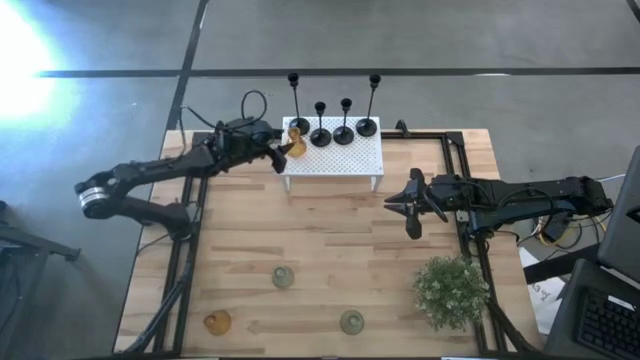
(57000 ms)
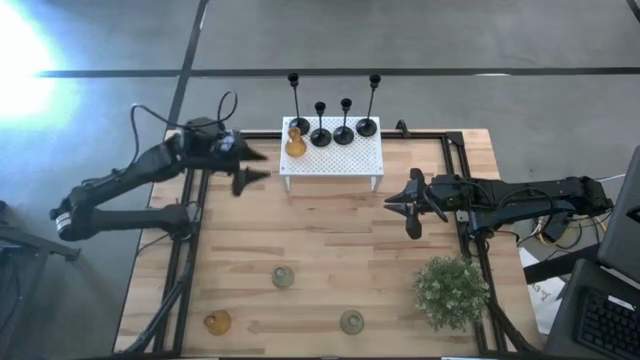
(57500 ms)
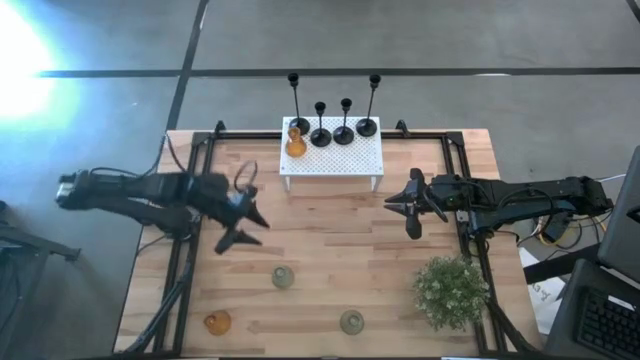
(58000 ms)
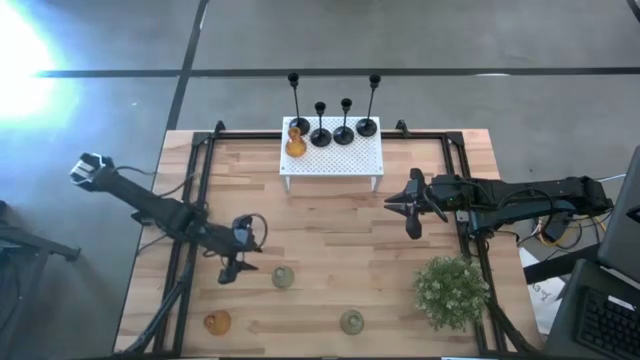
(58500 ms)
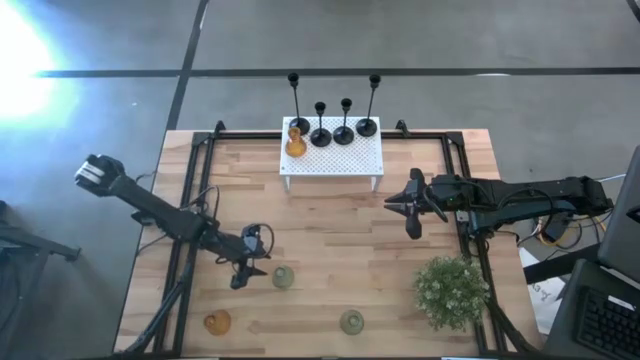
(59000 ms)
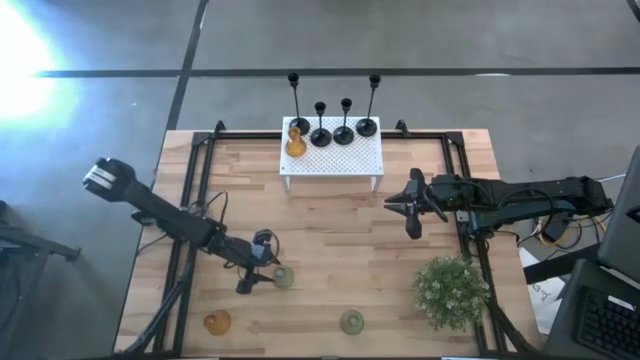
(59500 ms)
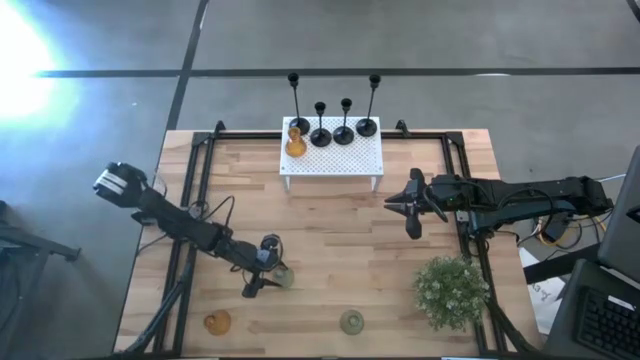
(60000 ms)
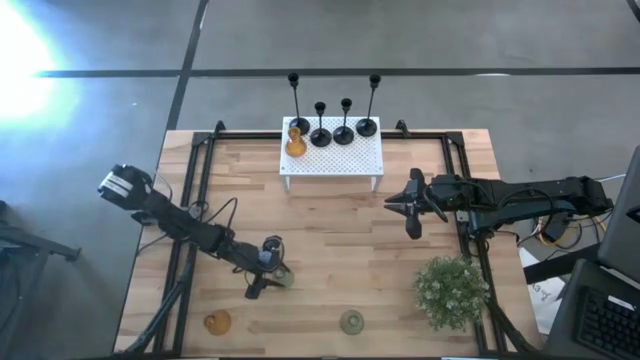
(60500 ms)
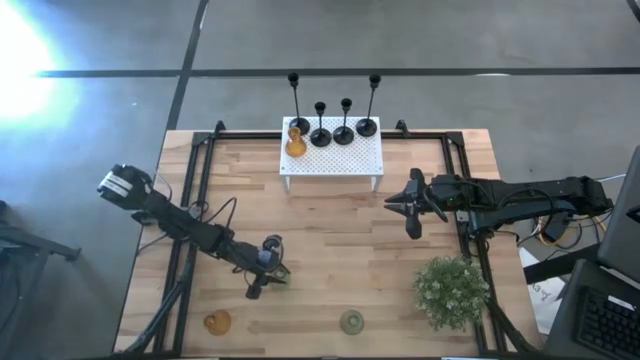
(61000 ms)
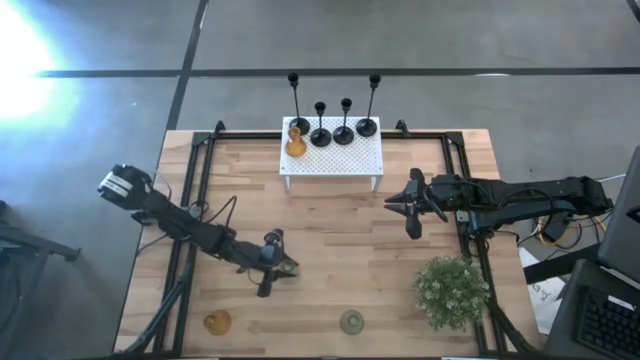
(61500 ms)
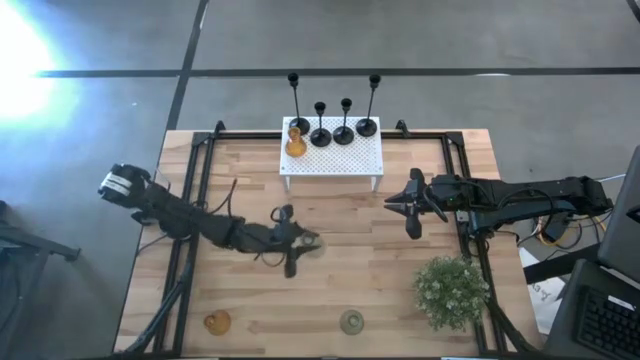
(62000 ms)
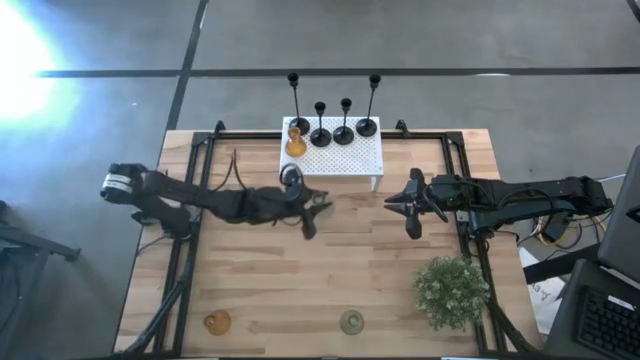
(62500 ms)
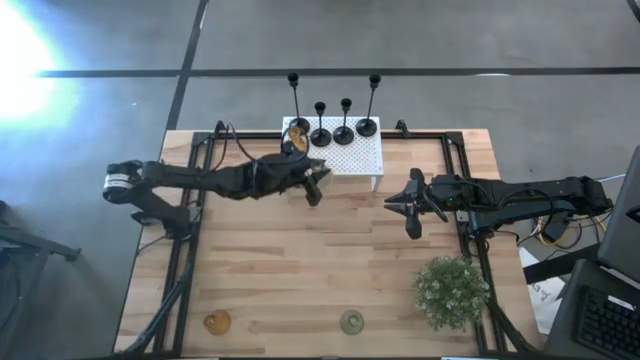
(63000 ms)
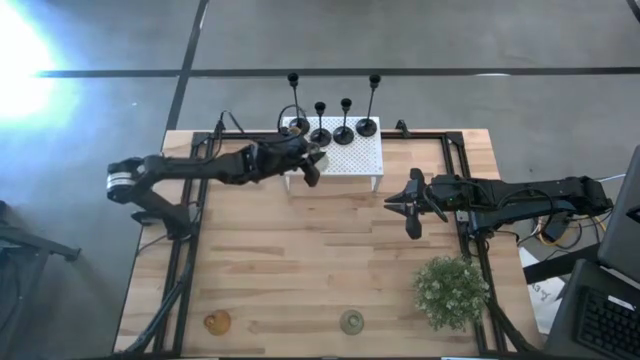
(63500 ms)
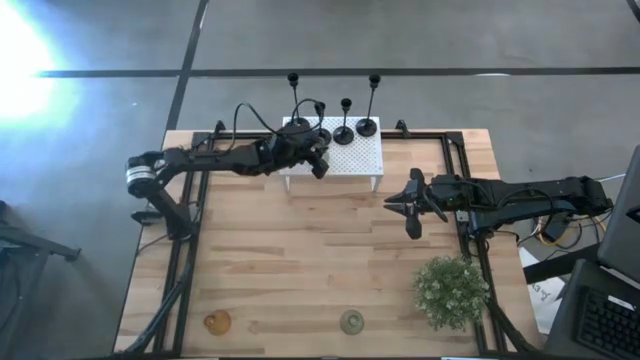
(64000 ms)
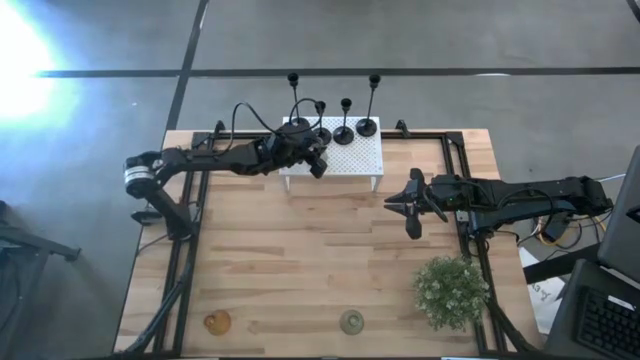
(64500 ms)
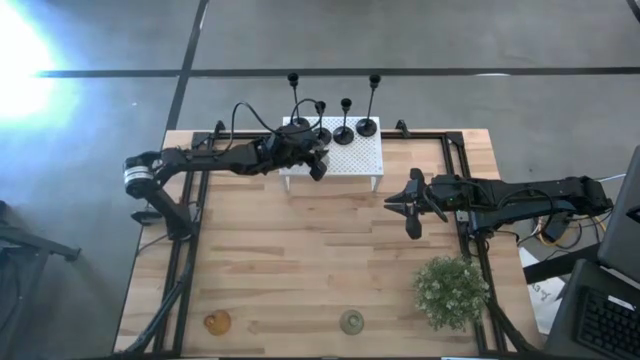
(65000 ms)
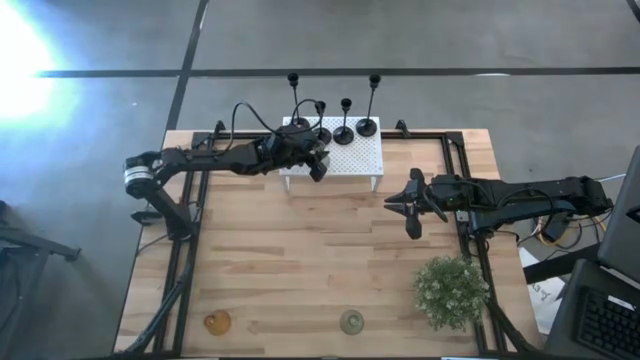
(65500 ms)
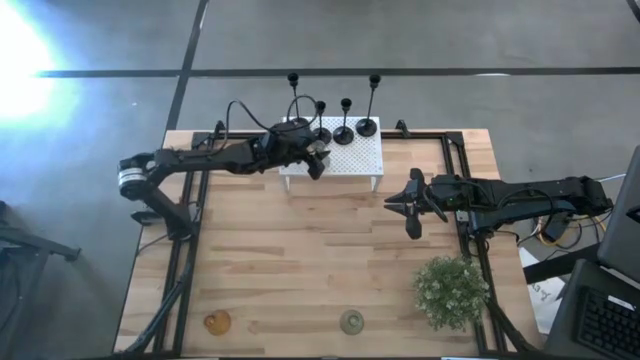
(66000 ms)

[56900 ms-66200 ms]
Task: Pick & Place candle stick holders
Put the left green glass candle holder on the shelf

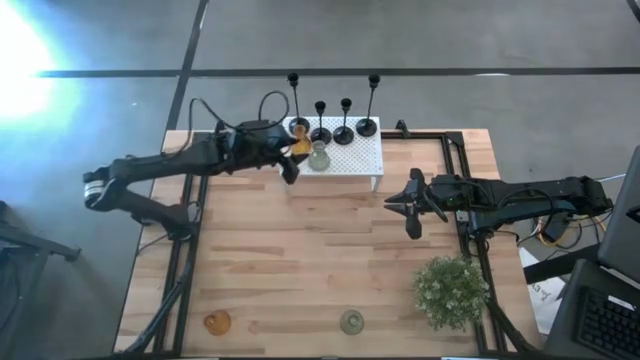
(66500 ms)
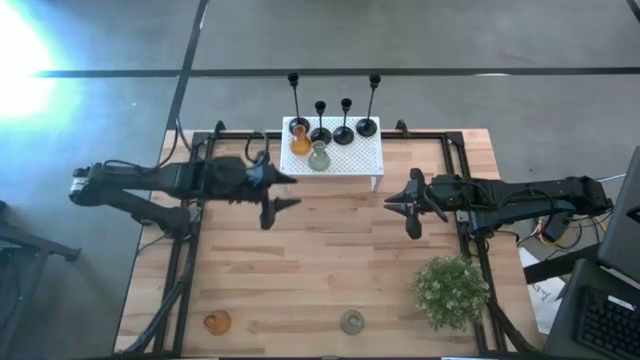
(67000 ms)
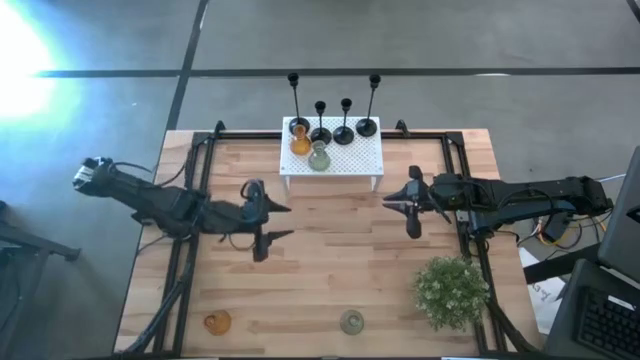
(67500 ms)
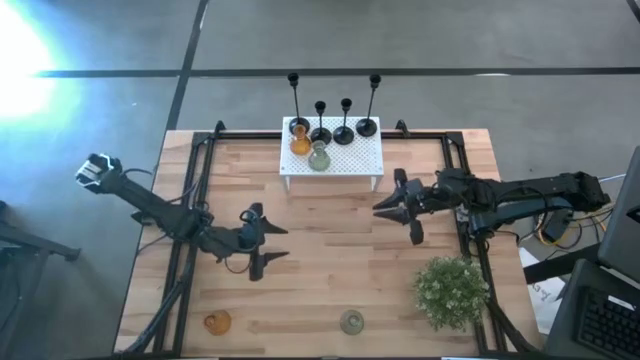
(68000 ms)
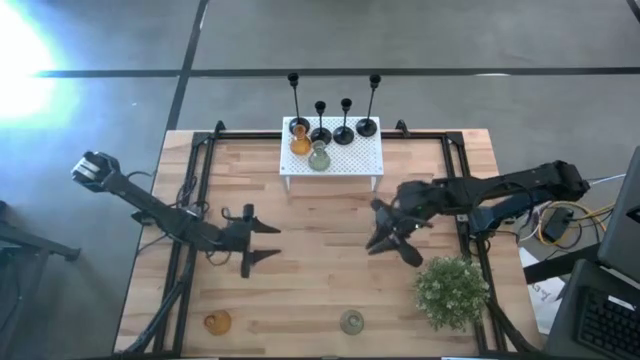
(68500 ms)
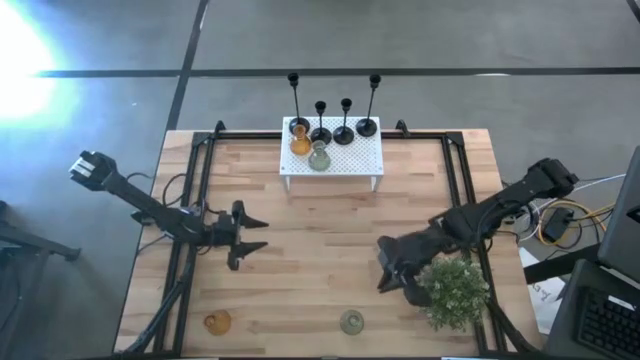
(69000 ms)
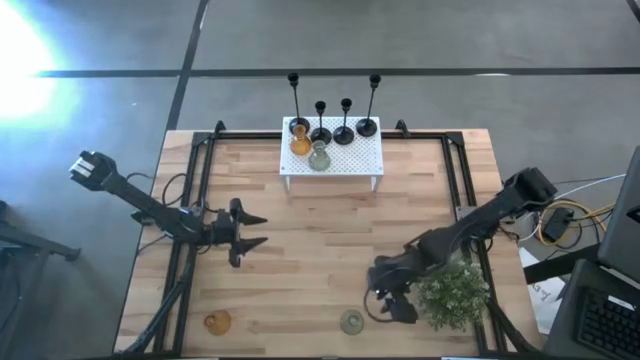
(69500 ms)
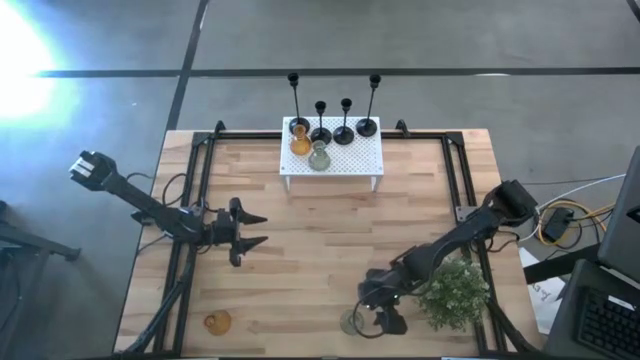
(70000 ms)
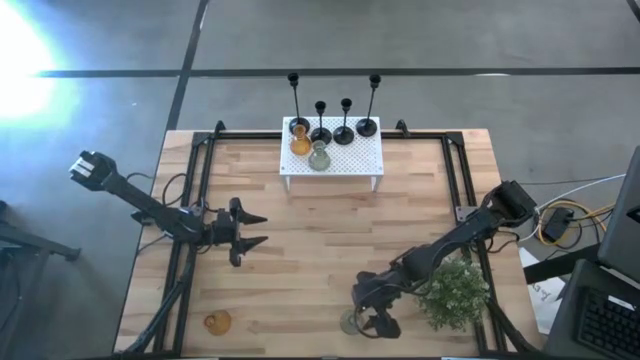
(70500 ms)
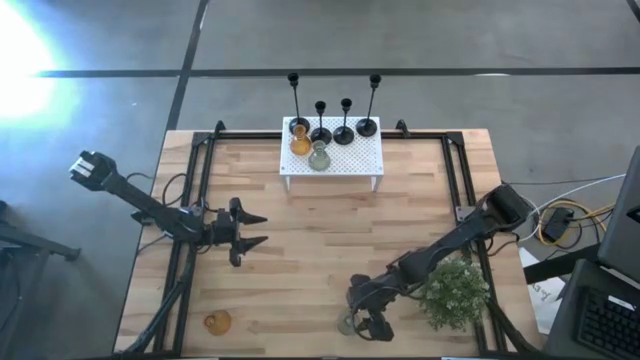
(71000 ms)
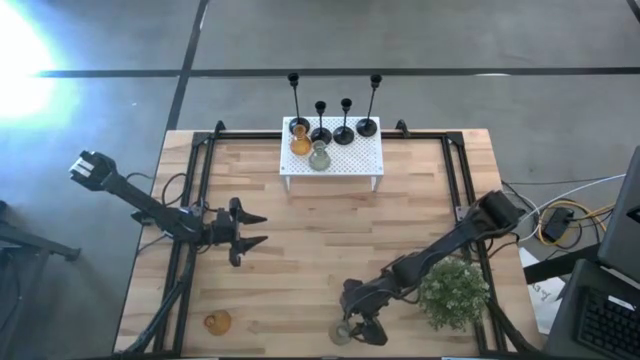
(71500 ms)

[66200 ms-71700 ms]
Put the green glass candle holder on the shelf

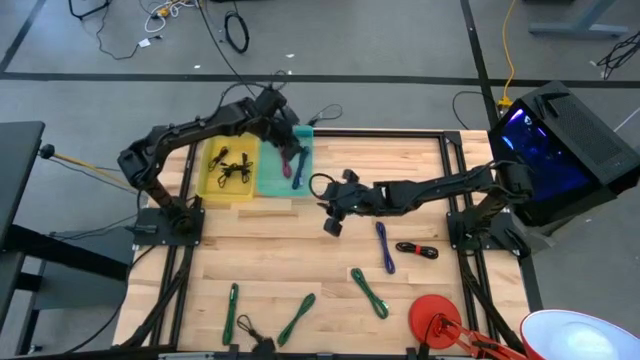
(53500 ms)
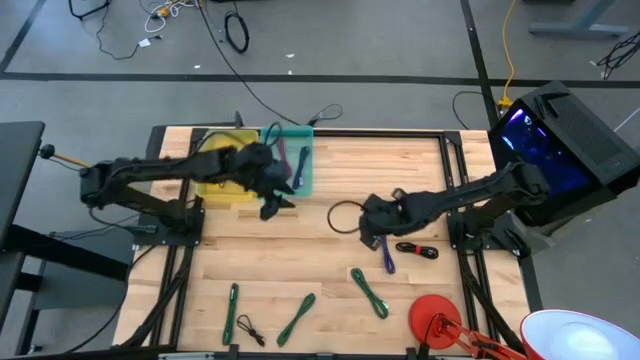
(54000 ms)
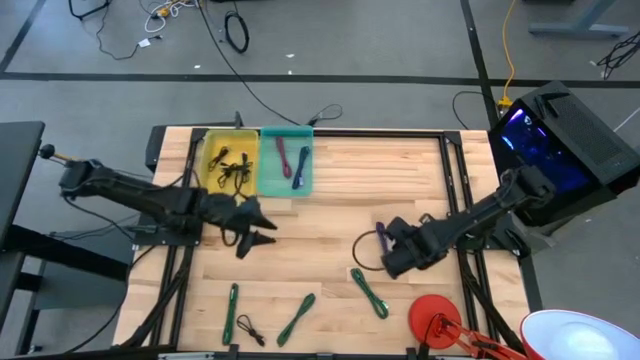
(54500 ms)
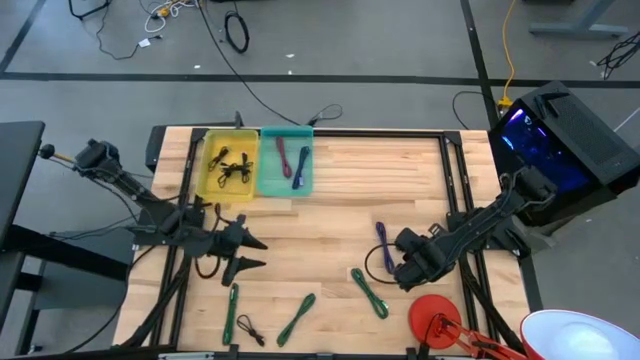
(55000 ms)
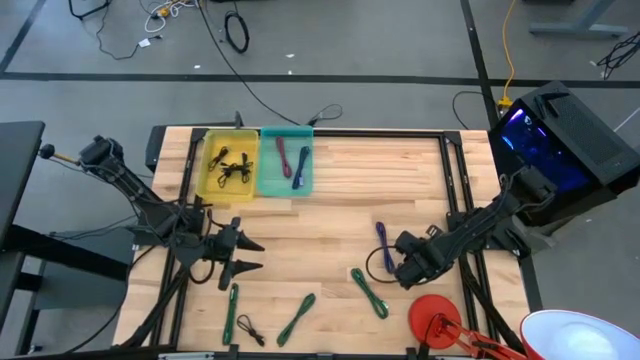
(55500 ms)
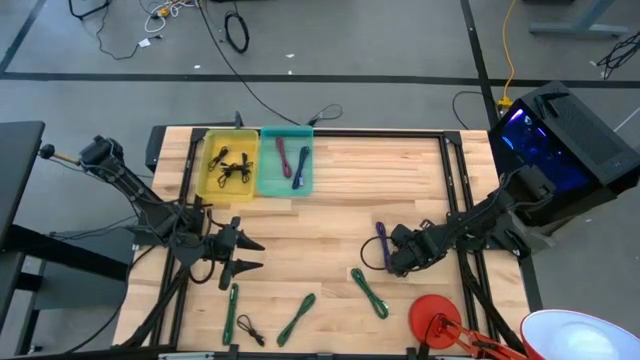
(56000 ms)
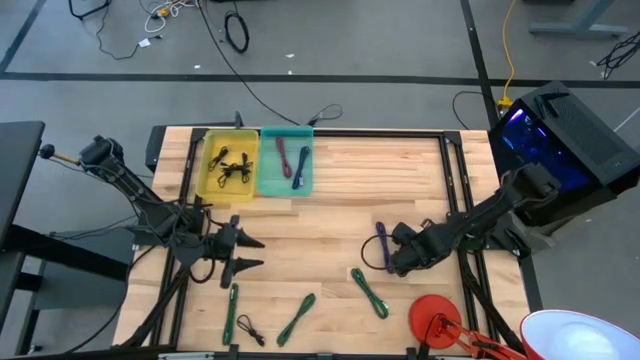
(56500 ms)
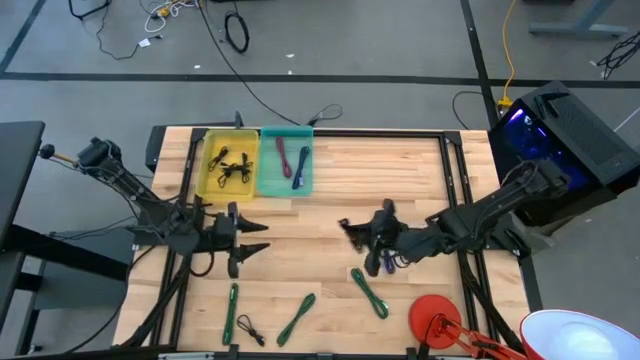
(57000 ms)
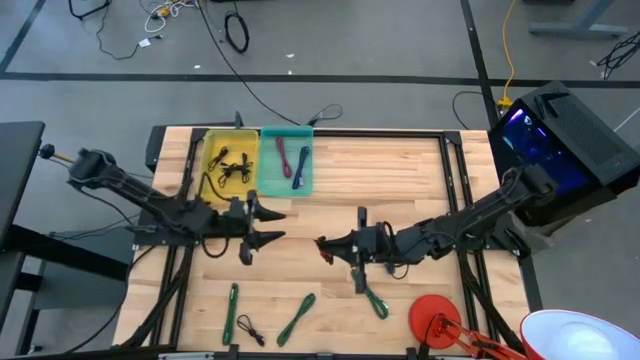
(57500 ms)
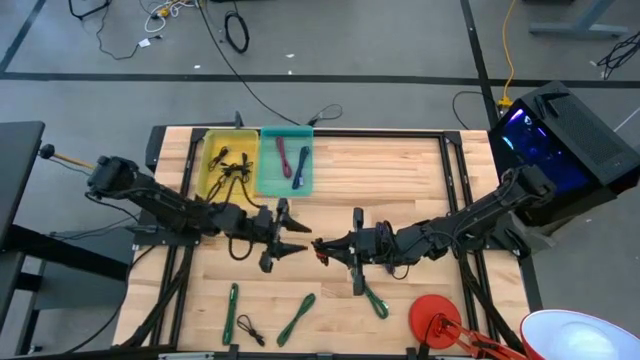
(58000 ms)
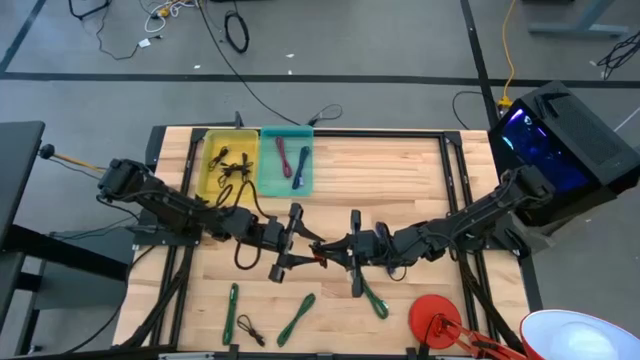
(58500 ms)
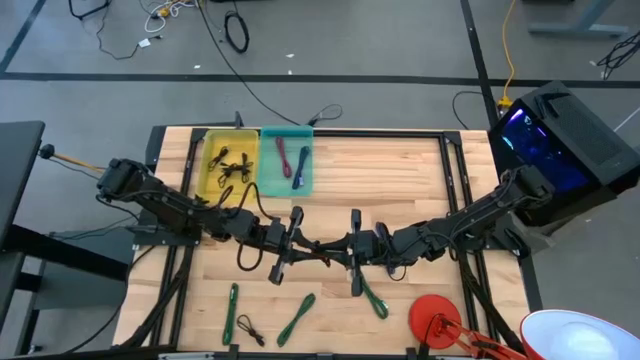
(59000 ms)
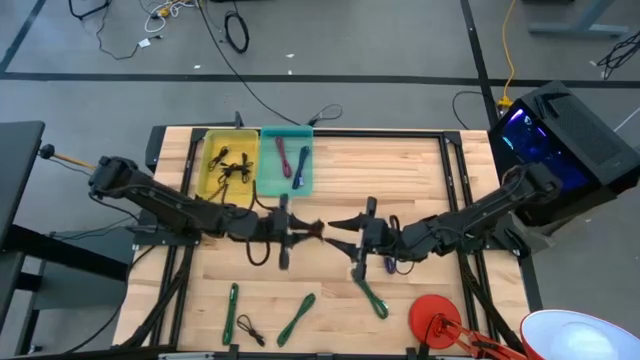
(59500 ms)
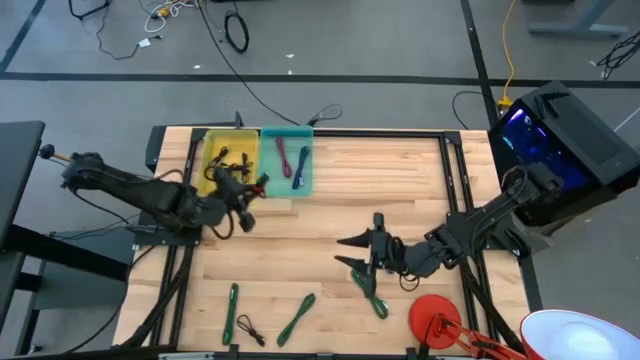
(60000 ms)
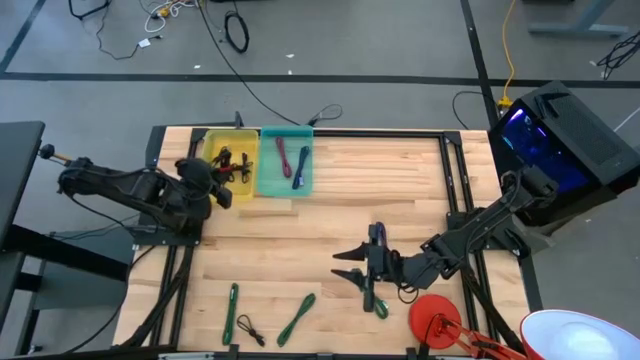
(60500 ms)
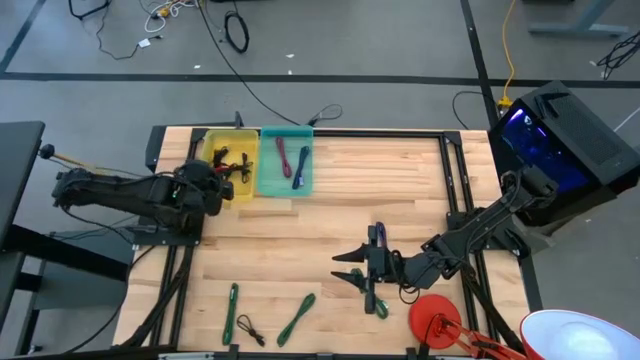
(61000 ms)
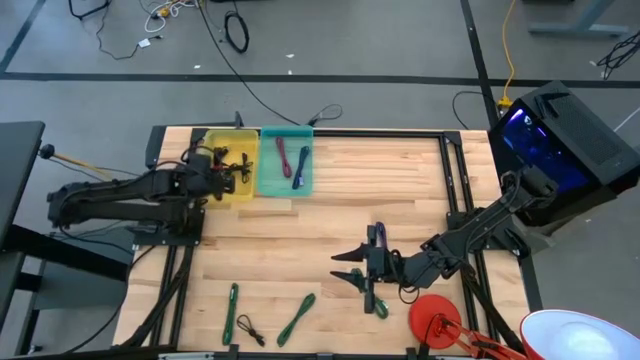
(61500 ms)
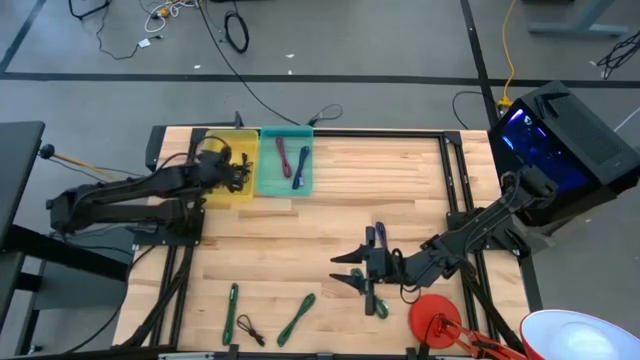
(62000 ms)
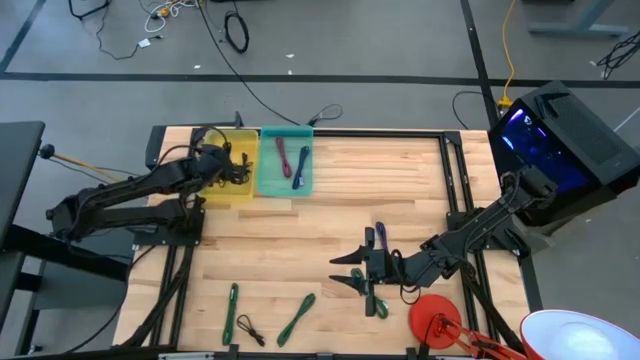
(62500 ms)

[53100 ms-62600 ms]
Task: Pick & Place USB Port
Put the black charger cable into the yellow bin
